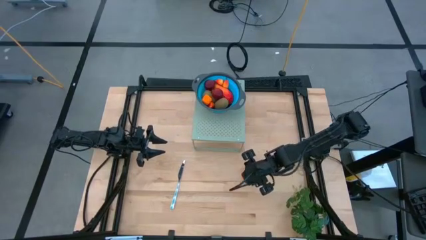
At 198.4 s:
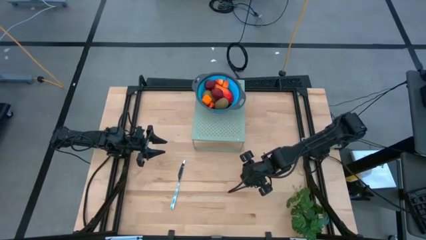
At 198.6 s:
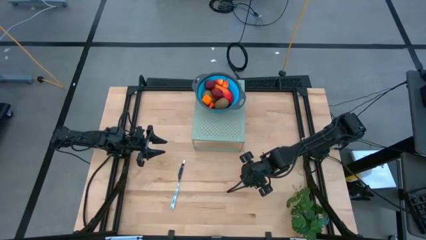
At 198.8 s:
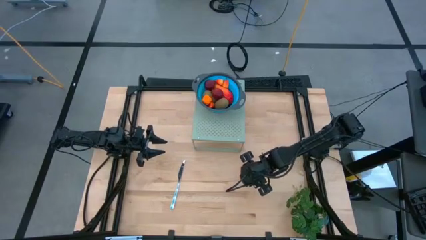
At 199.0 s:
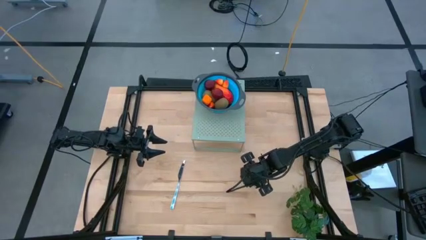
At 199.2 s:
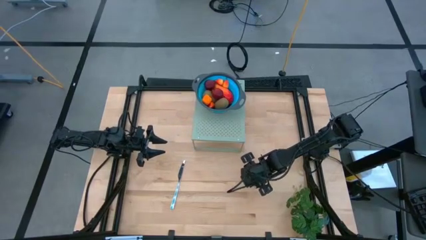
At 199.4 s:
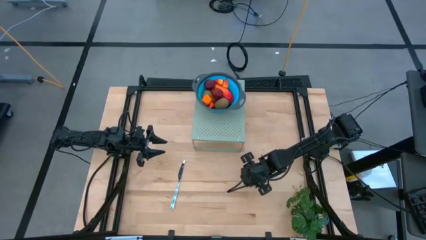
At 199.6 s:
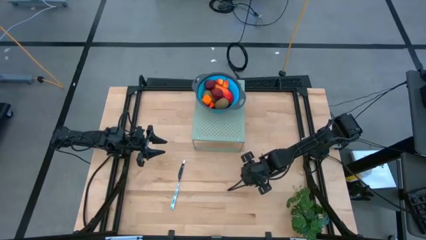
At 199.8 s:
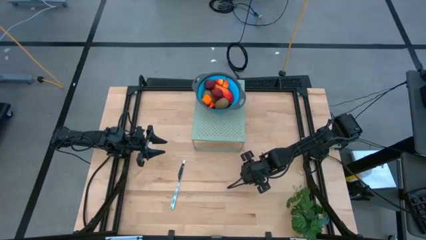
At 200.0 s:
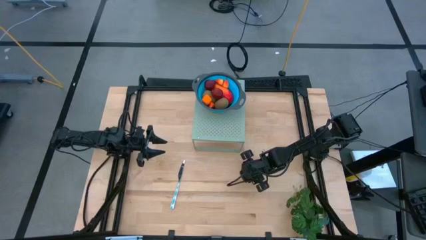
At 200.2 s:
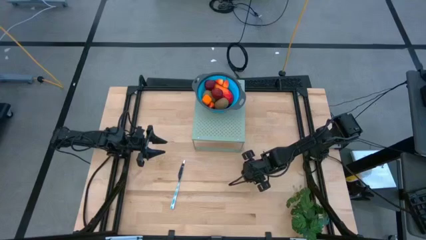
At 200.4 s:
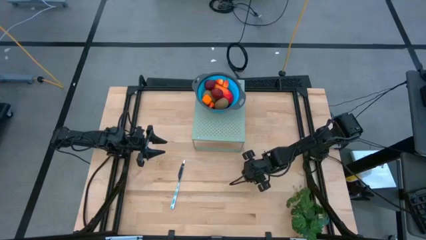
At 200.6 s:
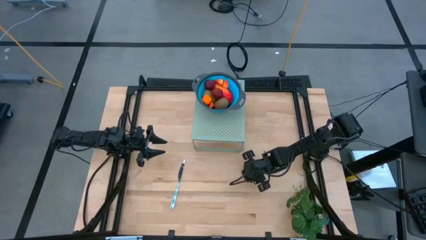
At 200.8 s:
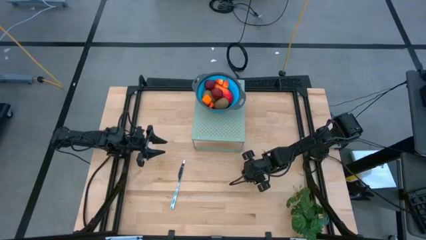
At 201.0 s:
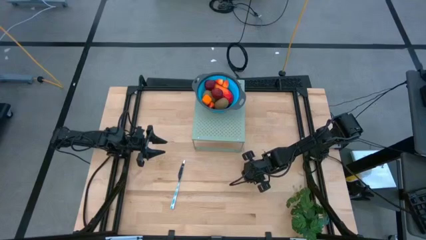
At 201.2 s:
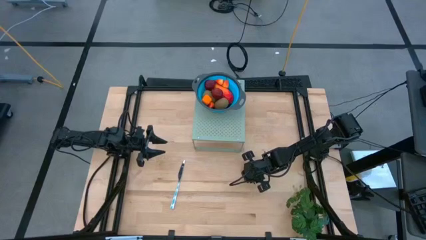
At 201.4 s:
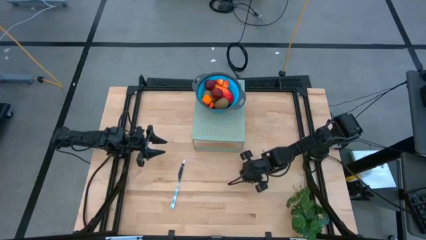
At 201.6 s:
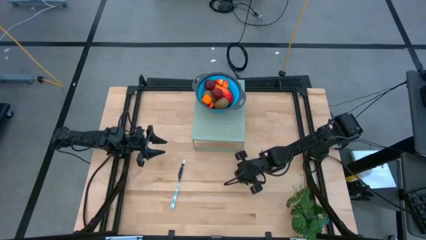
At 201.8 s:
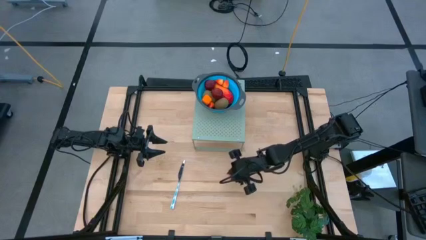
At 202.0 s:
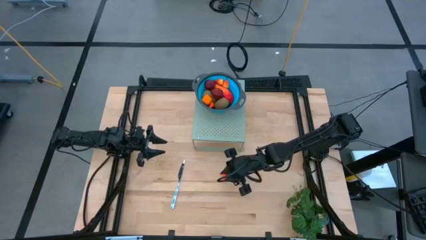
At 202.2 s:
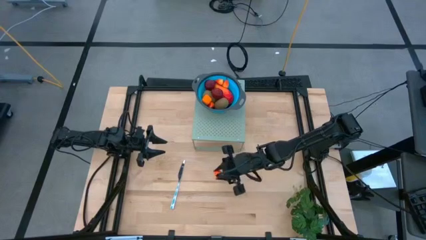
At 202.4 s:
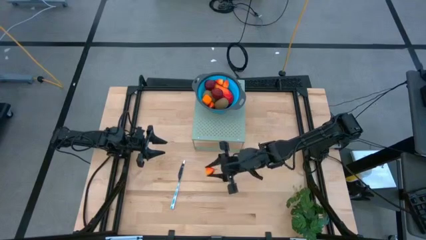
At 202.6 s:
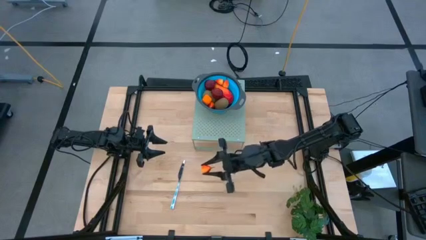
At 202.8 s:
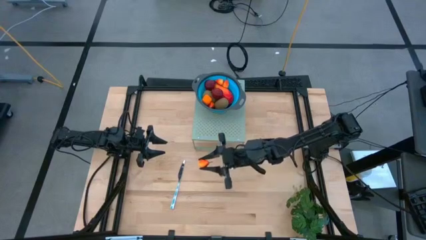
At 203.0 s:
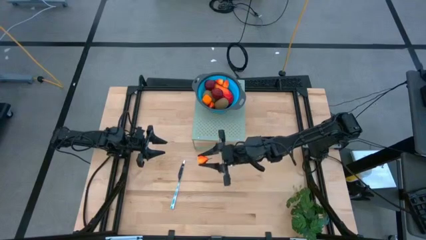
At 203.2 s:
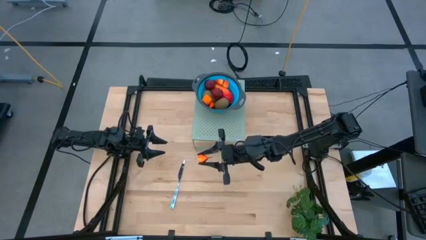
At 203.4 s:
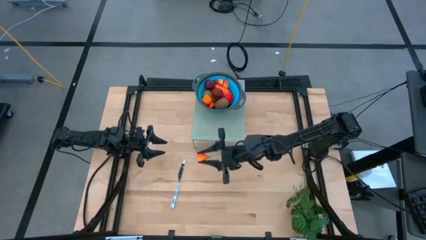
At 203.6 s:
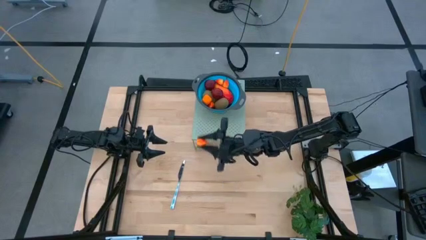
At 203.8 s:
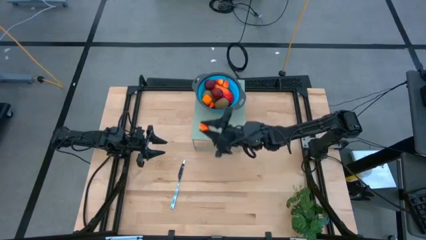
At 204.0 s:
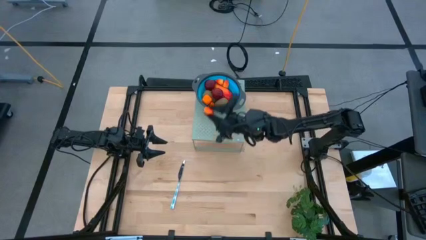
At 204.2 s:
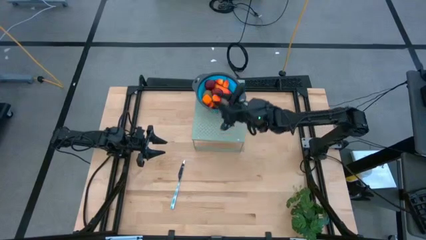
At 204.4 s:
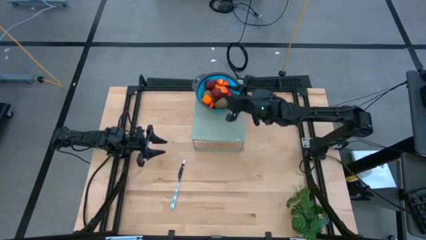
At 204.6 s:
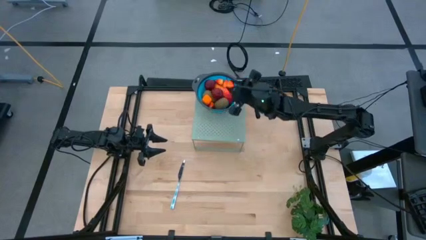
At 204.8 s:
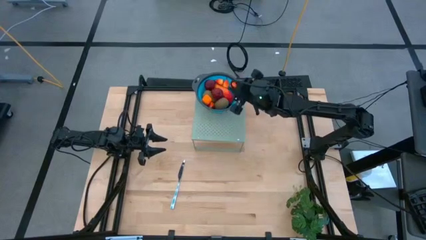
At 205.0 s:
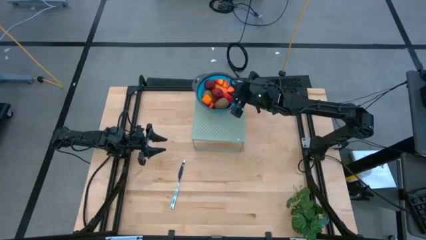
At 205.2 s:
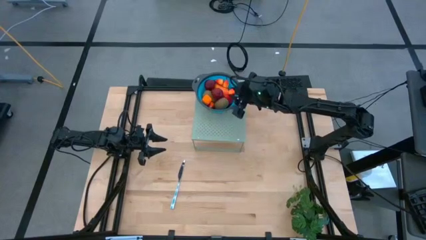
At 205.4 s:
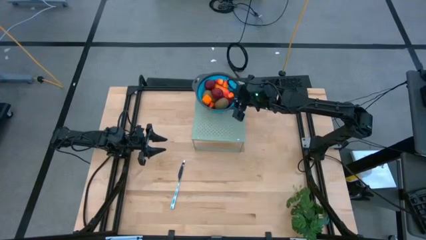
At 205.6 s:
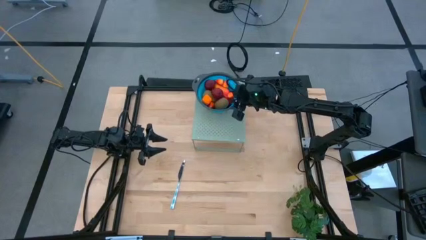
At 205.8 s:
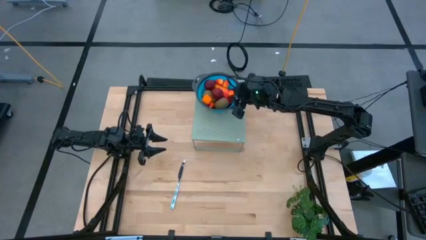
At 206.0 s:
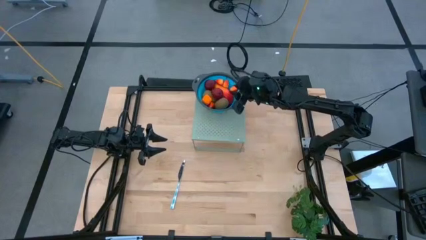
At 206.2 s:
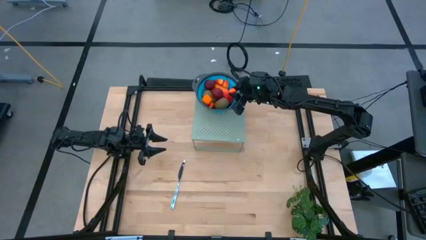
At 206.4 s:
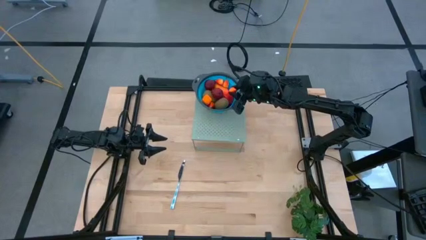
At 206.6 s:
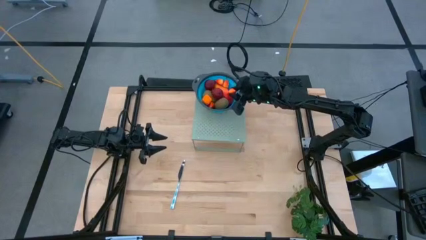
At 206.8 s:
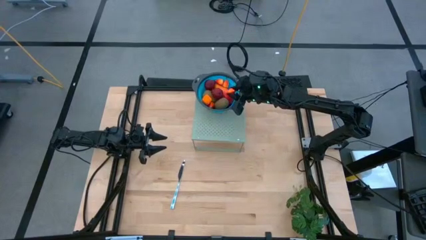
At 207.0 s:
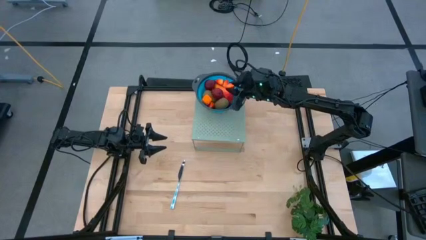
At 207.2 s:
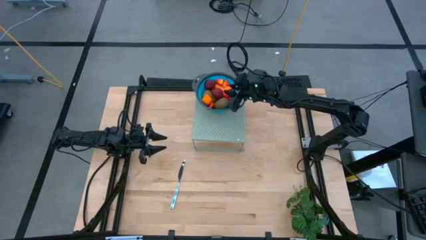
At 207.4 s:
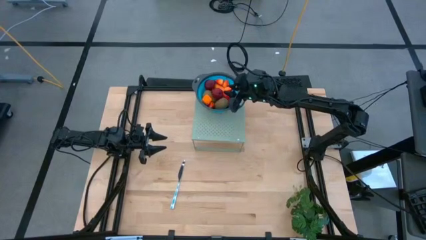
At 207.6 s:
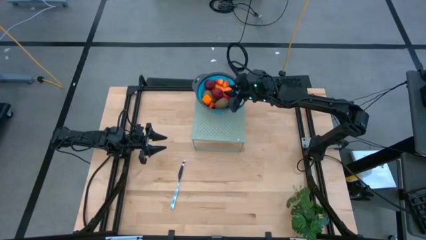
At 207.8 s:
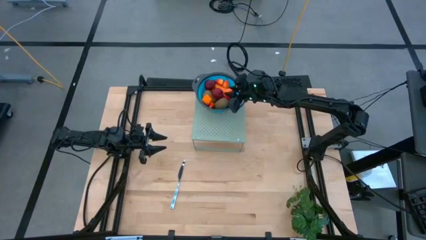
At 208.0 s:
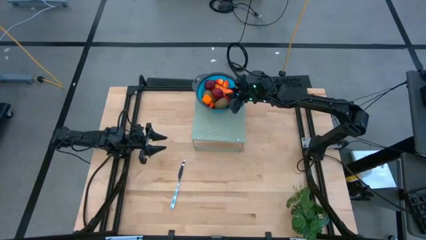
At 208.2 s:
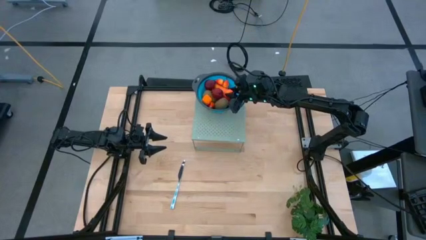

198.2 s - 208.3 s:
Task: Pick & Place Fruit
Put the Peach into the blue strainer bowl on the shelf

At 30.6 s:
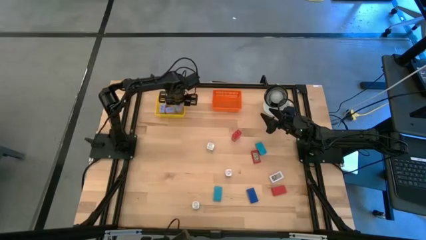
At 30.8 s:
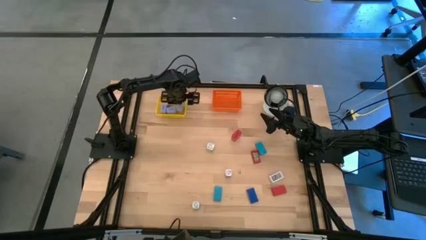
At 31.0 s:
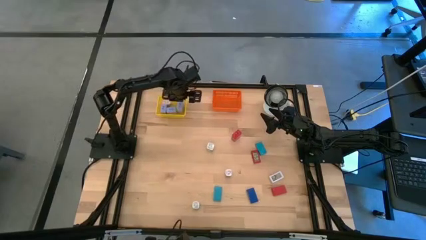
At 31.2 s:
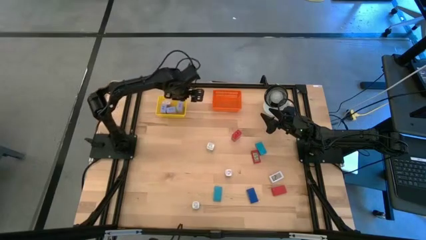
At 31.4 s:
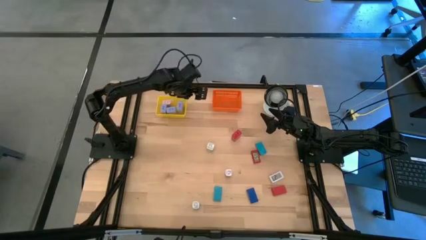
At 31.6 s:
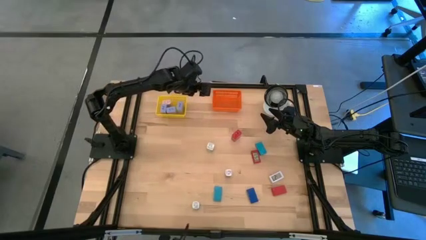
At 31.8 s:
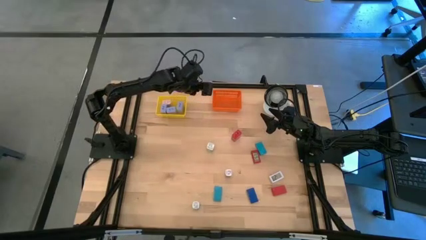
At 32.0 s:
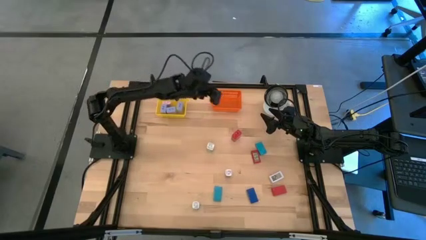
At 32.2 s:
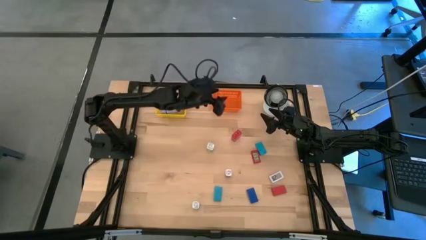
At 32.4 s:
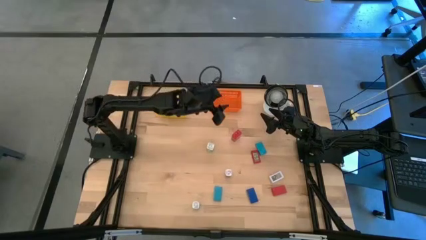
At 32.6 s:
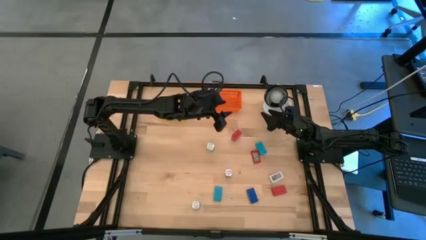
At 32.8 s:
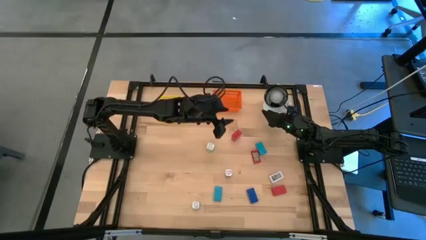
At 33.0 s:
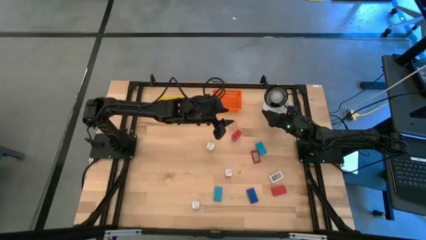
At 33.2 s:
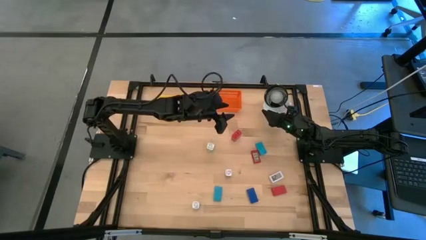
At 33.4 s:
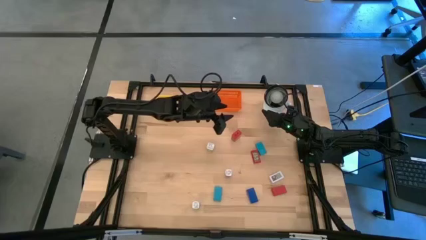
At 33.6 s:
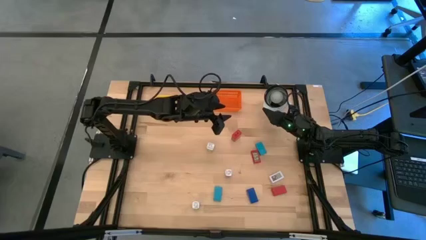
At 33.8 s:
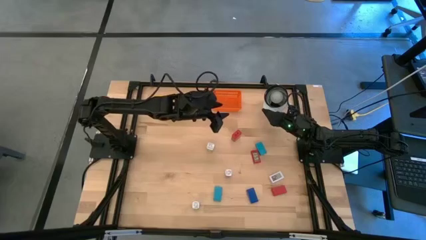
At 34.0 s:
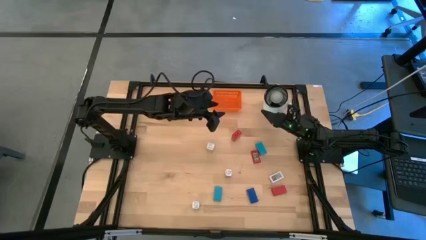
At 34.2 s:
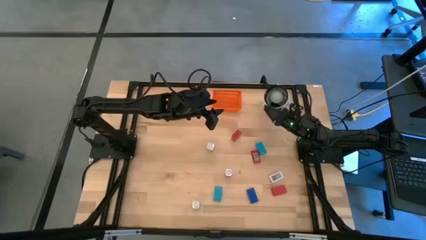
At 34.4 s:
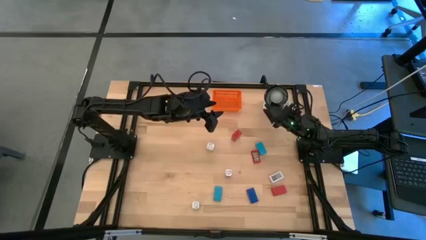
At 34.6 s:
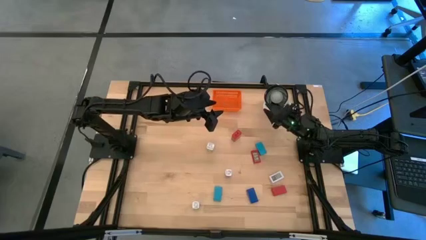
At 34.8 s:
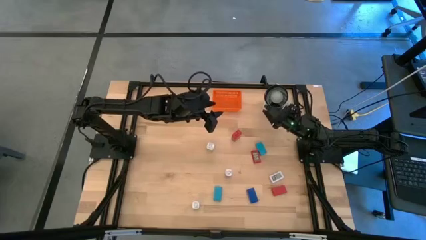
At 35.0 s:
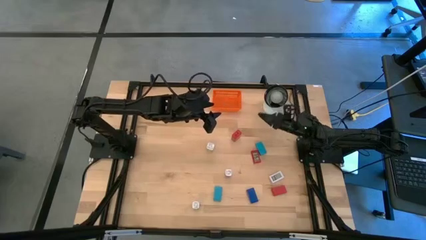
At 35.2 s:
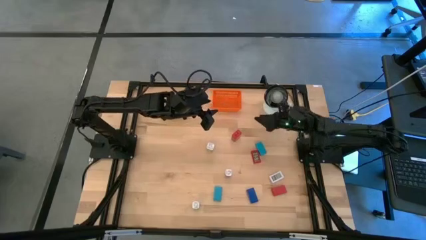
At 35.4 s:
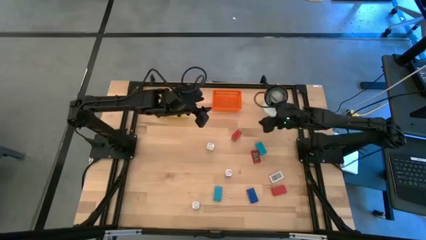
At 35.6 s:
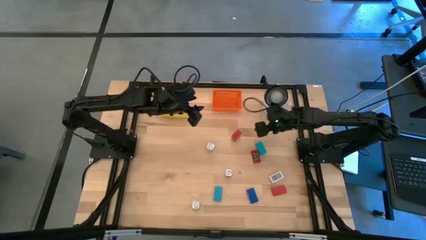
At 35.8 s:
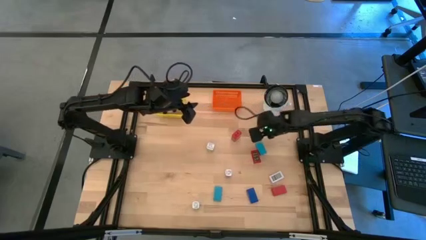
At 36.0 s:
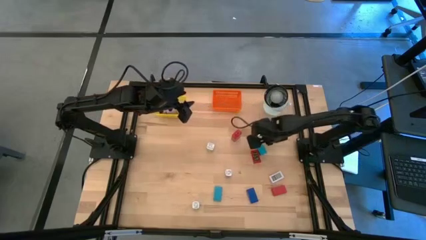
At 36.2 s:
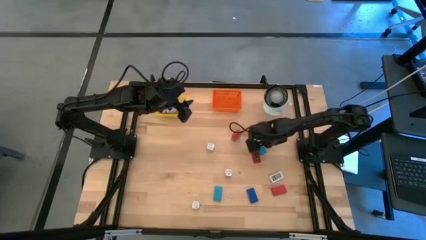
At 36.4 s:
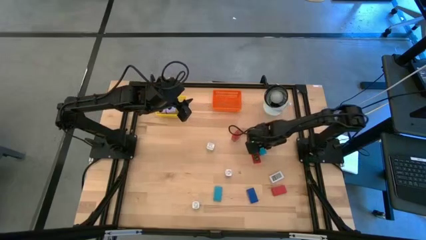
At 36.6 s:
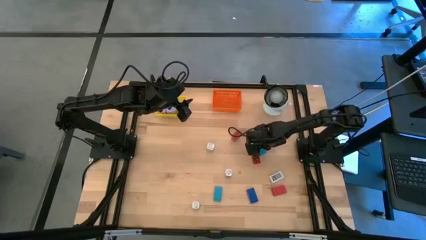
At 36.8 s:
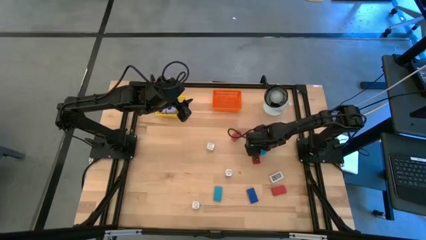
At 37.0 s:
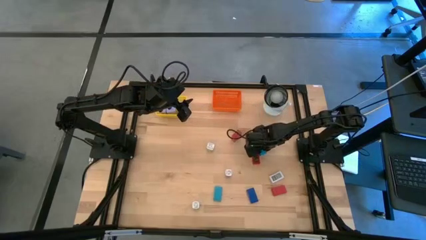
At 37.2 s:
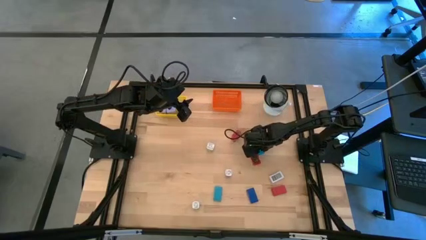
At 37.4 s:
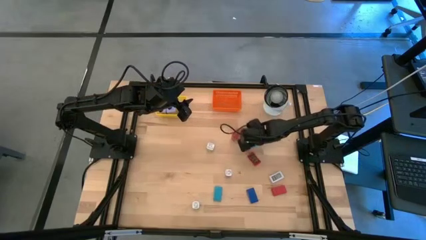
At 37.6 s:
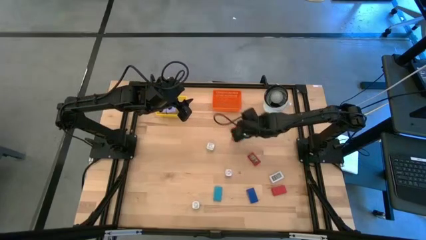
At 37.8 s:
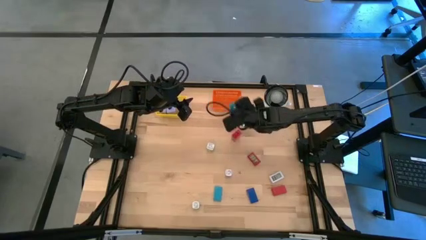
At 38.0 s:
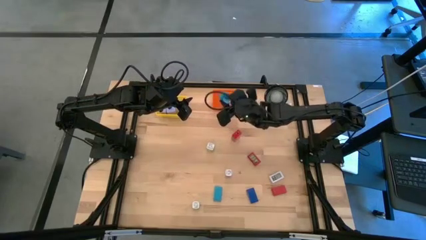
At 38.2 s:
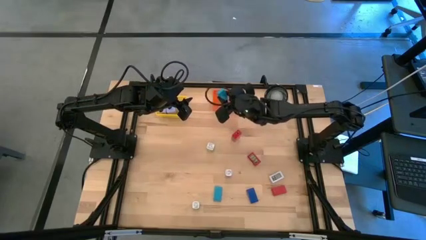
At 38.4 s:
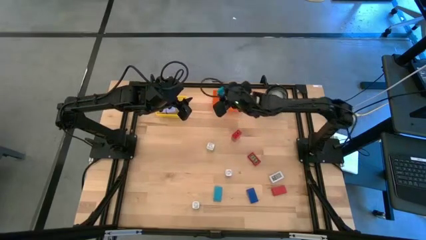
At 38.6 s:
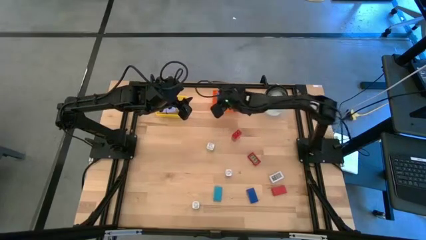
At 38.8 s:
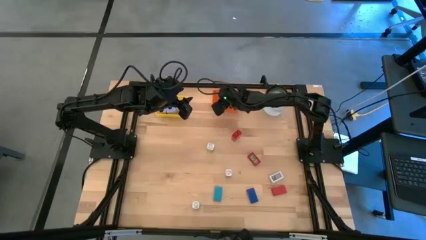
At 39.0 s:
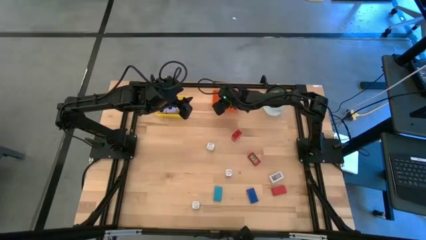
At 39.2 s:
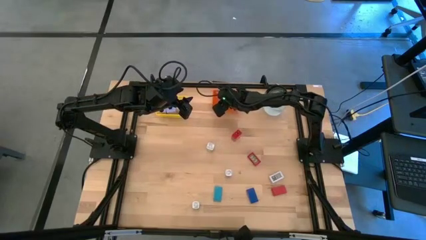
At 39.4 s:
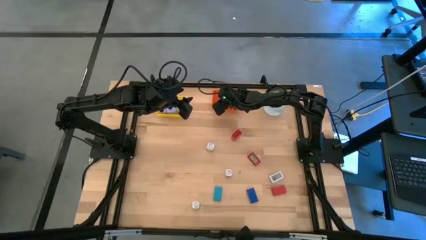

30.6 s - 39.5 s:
Task: Pick & Place Office items
Put the top blue digital timer into the orange bin
